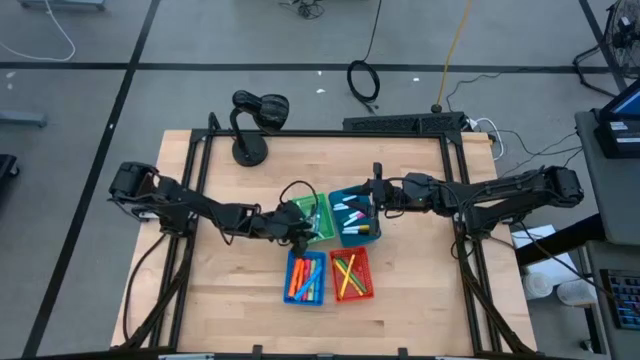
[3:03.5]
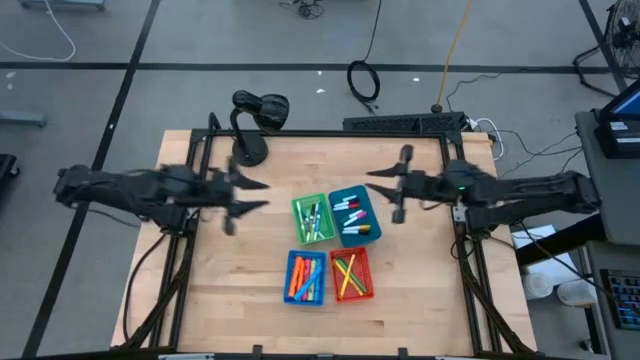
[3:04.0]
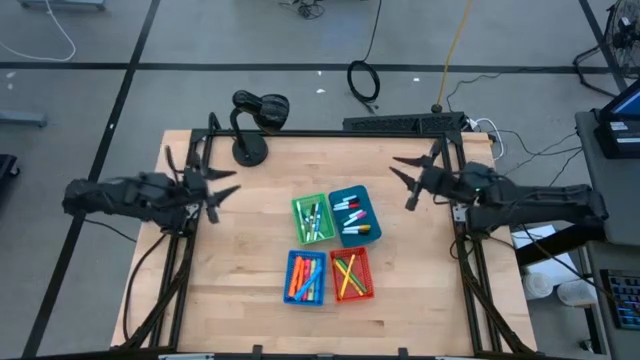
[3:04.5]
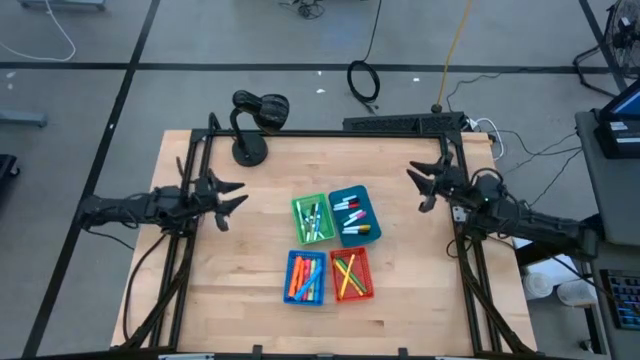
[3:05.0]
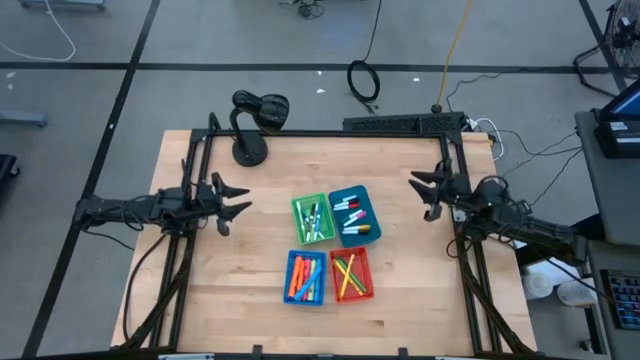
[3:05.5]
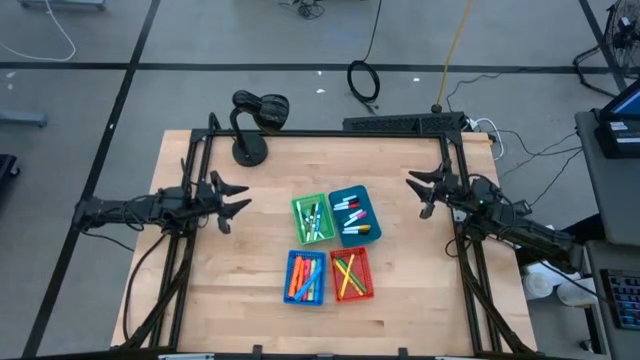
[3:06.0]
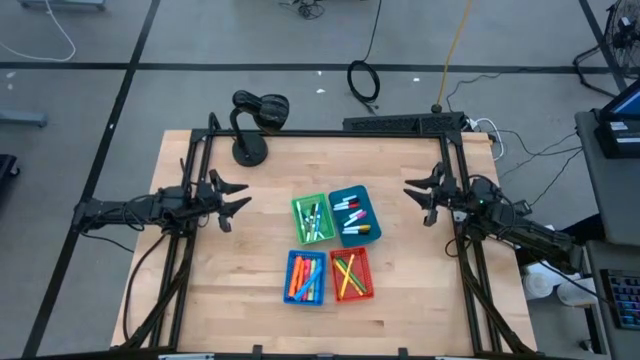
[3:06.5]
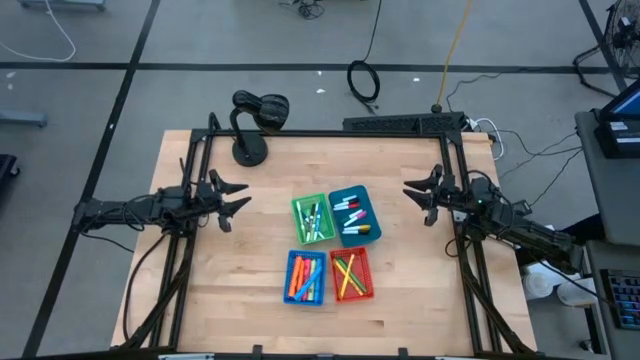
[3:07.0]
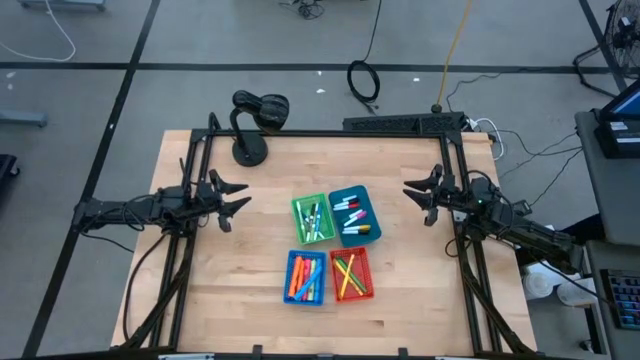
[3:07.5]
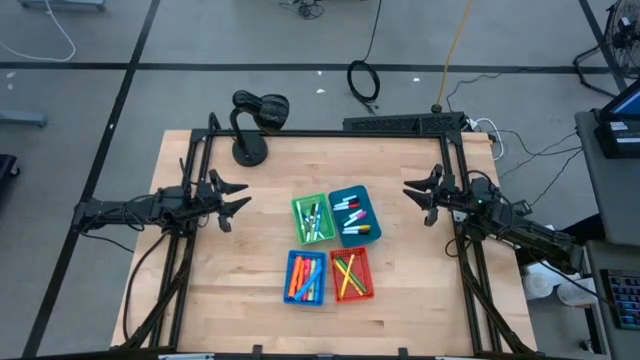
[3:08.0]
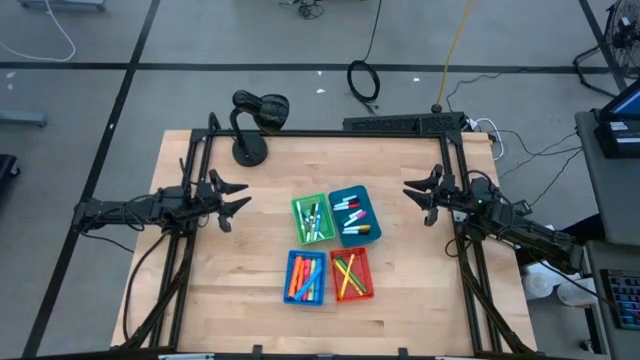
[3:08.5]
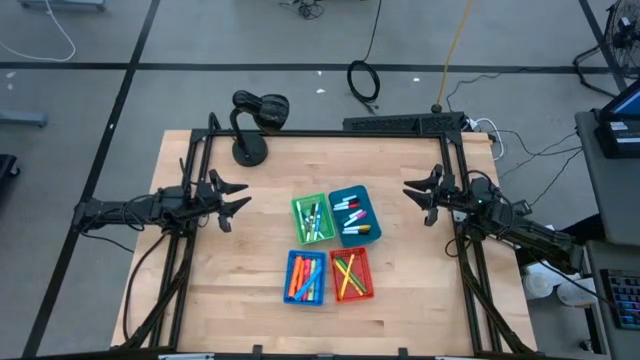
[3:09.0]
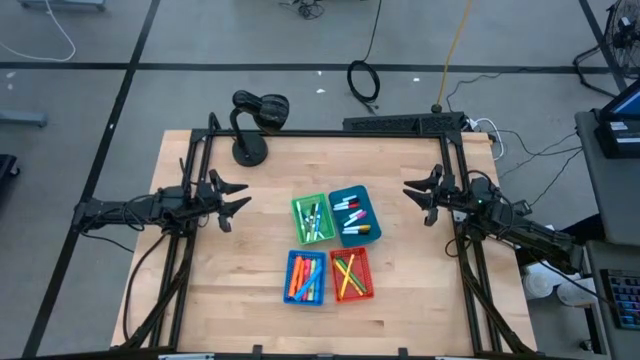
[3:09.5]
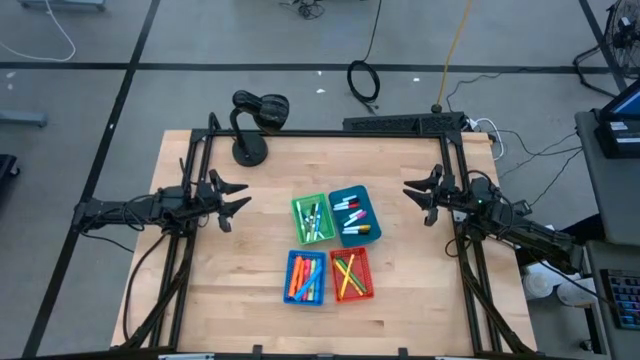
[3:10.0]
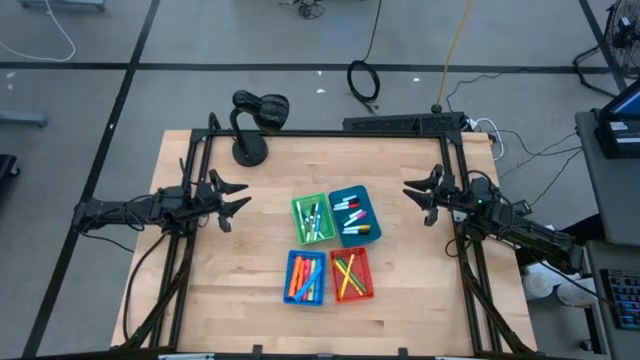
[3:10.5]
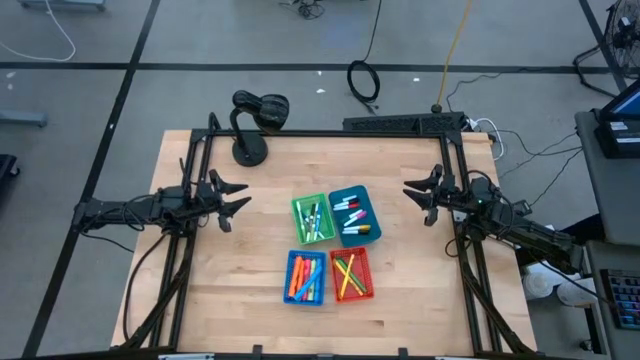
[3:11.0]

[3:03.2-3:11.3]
Task: Pick & Place Markers
Return to Home Position

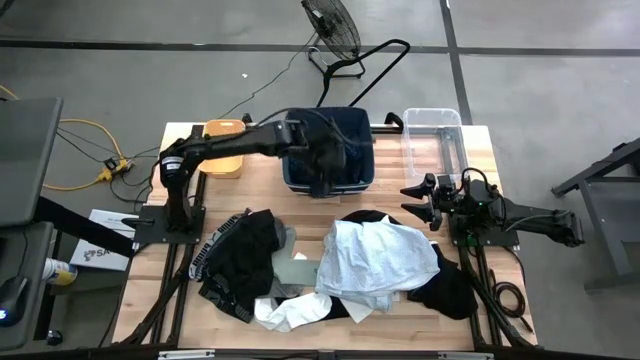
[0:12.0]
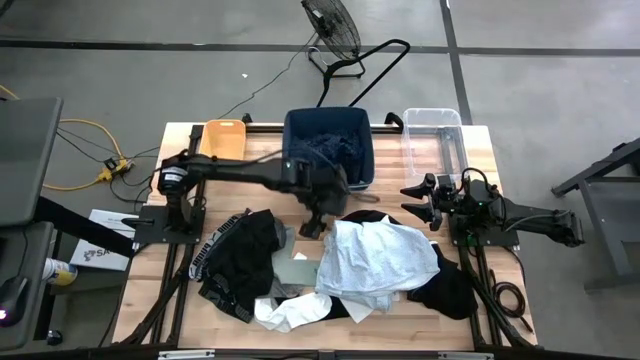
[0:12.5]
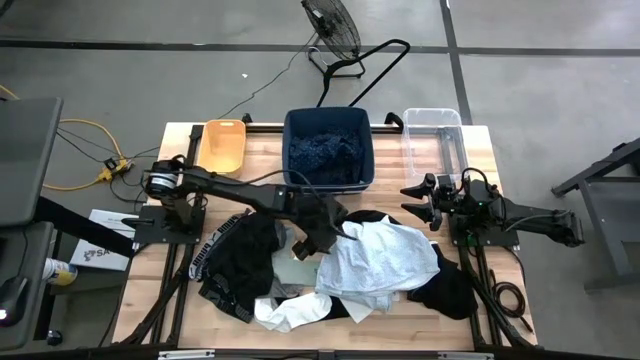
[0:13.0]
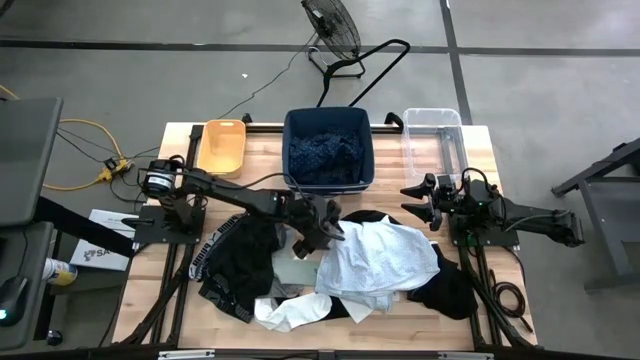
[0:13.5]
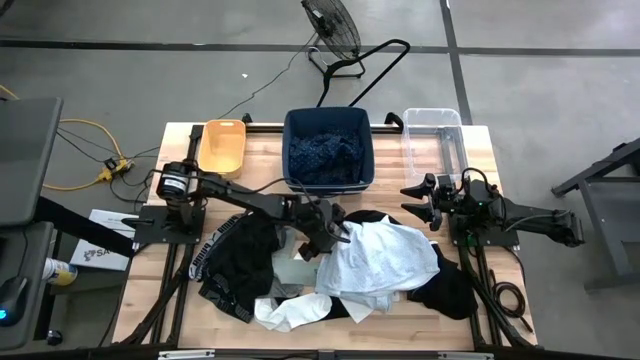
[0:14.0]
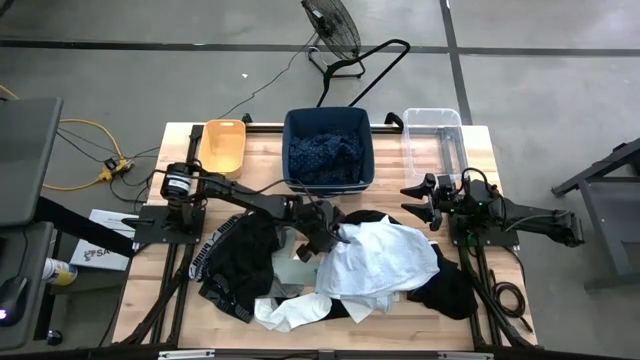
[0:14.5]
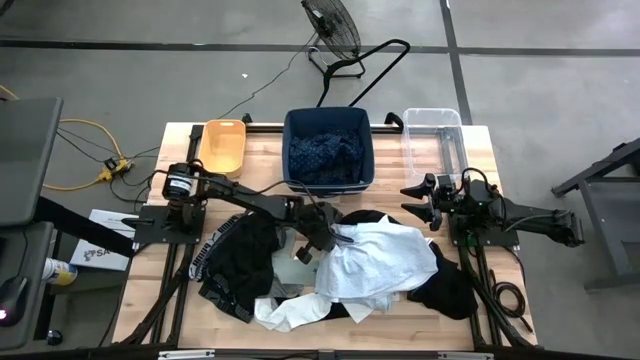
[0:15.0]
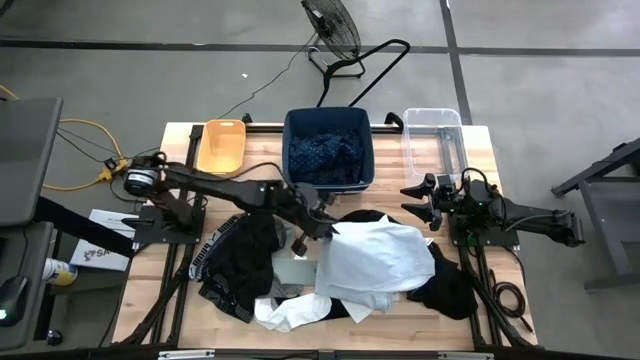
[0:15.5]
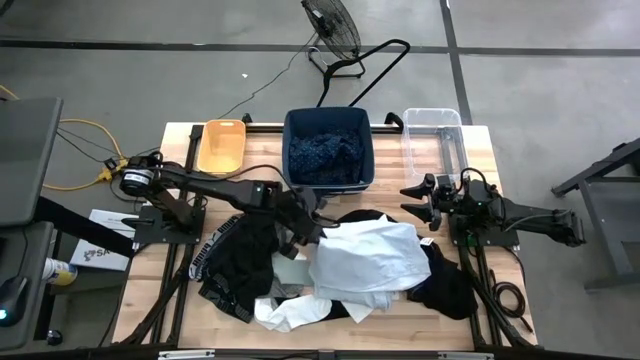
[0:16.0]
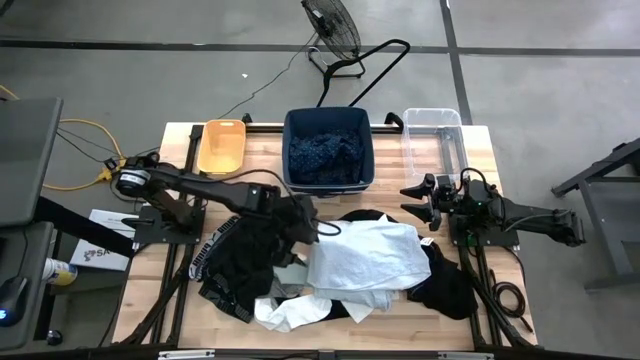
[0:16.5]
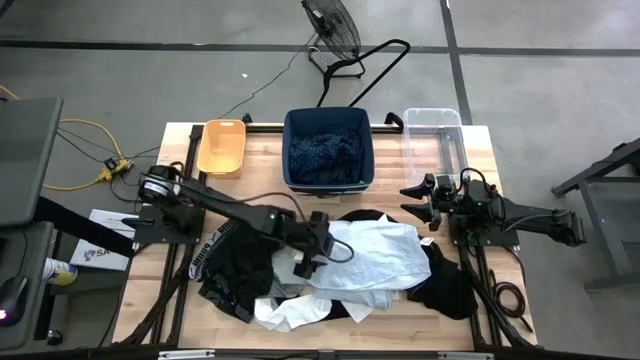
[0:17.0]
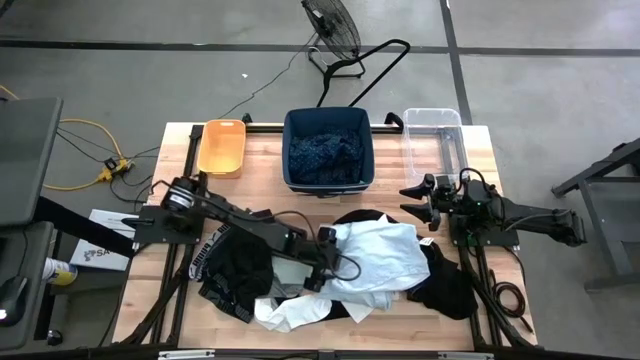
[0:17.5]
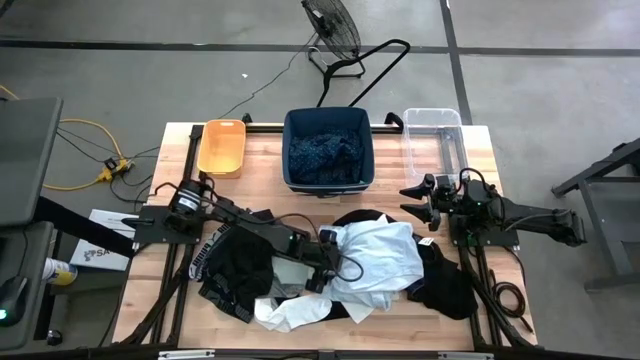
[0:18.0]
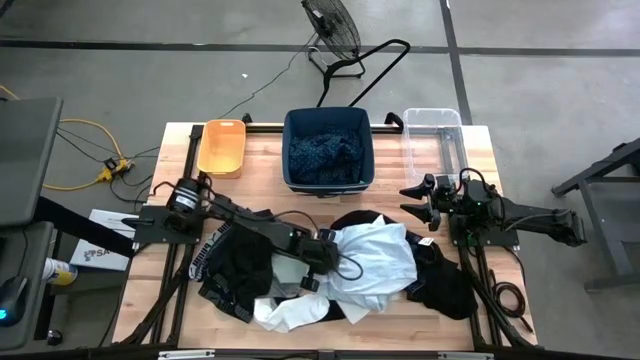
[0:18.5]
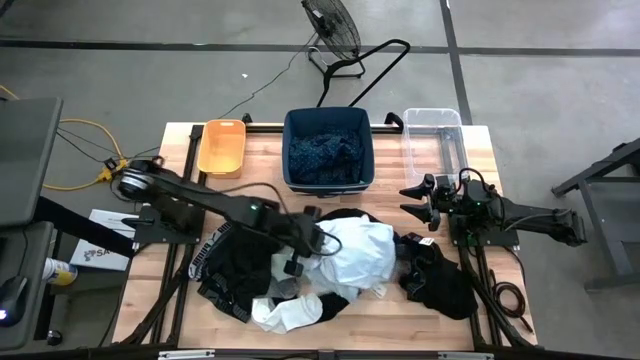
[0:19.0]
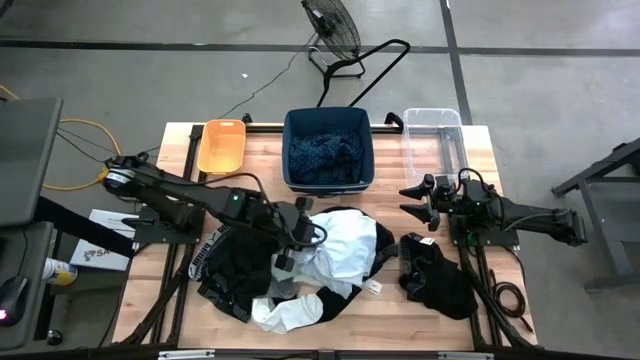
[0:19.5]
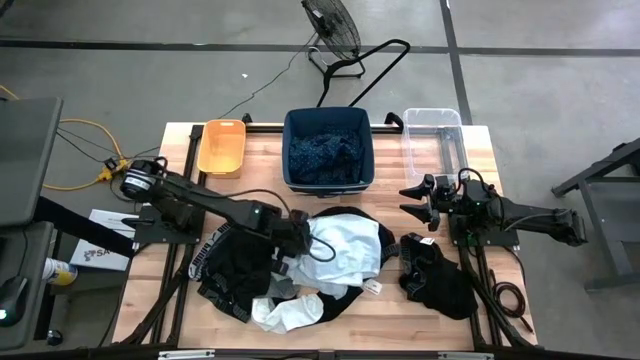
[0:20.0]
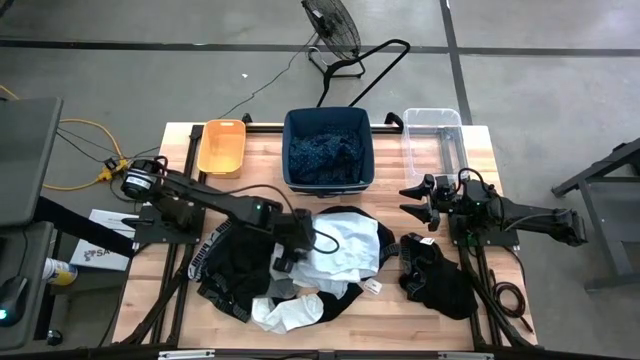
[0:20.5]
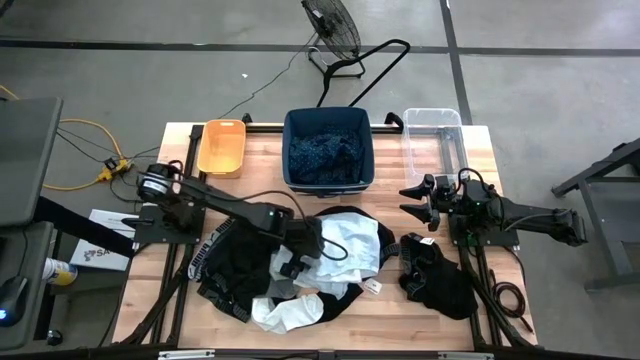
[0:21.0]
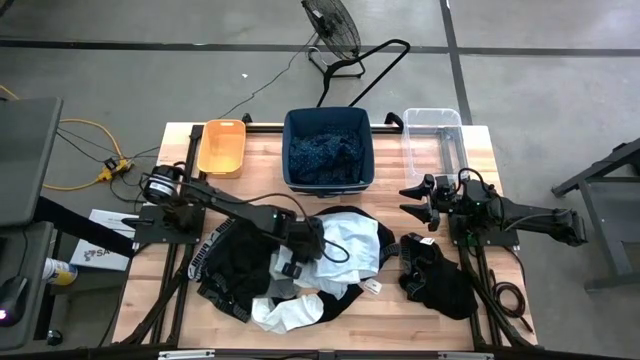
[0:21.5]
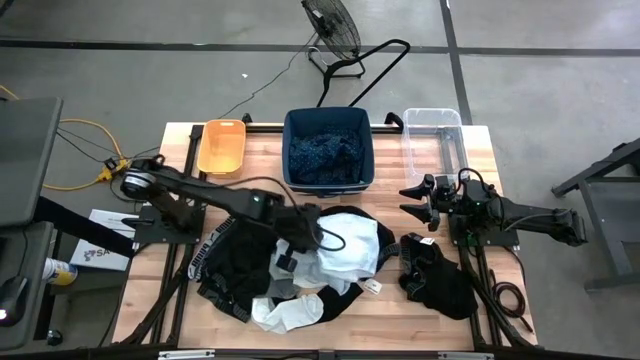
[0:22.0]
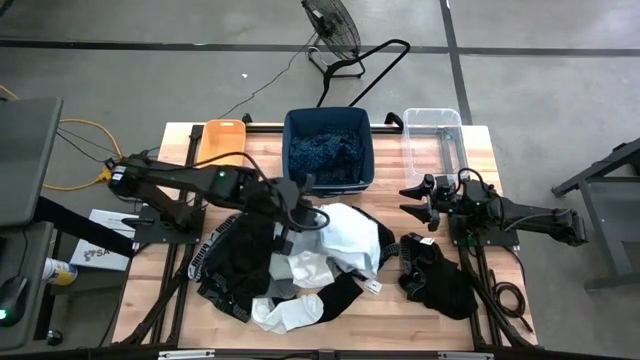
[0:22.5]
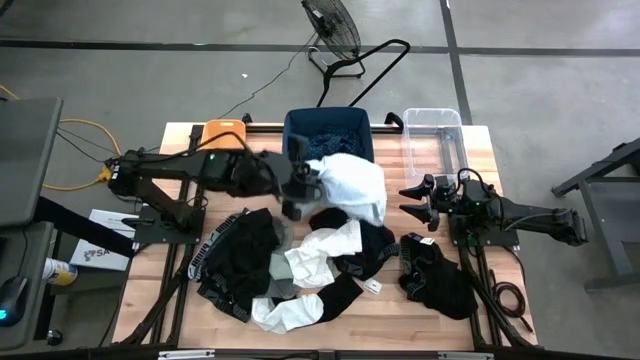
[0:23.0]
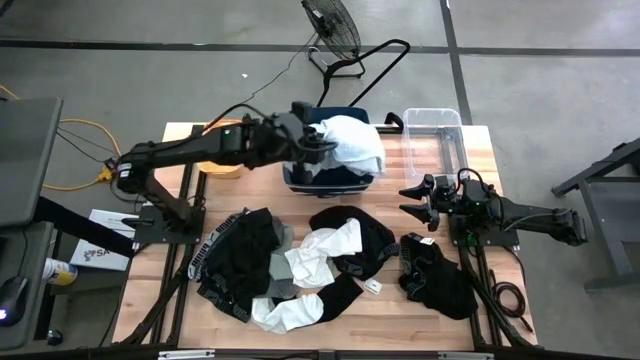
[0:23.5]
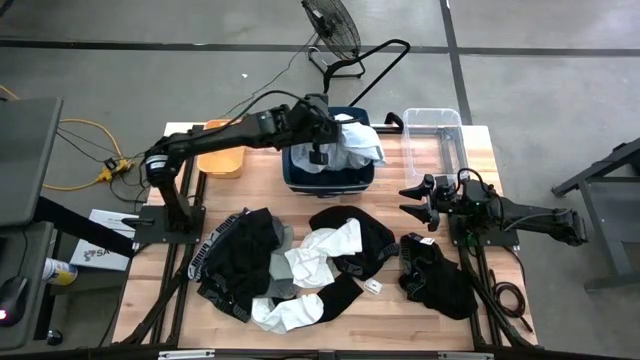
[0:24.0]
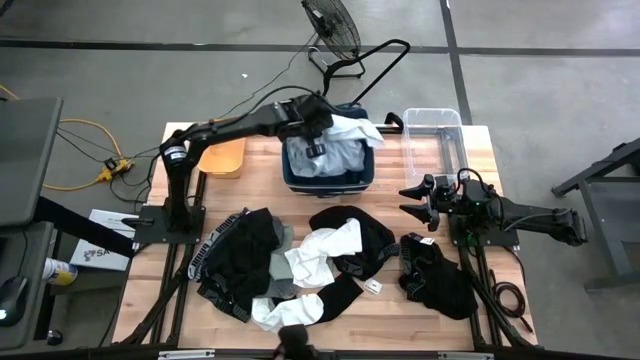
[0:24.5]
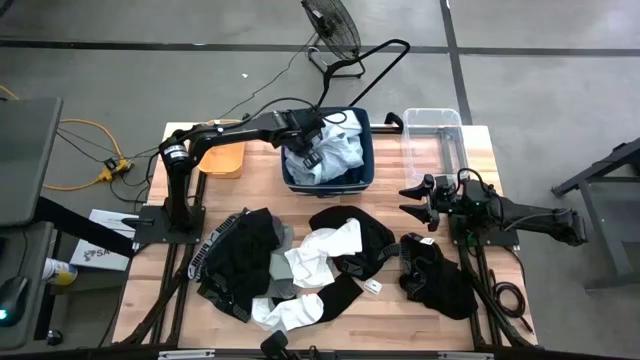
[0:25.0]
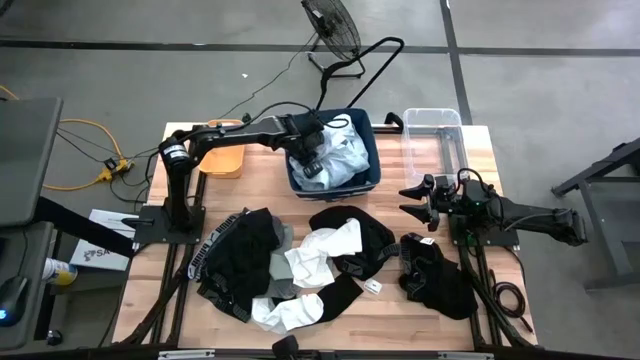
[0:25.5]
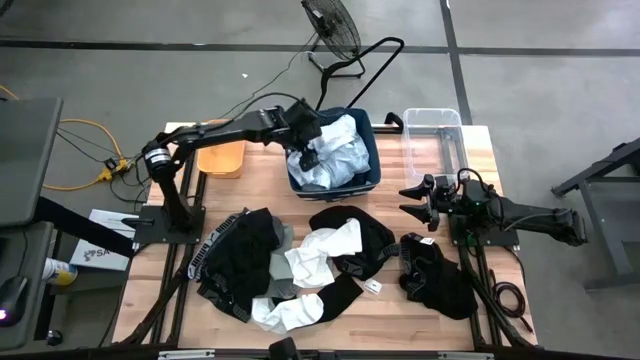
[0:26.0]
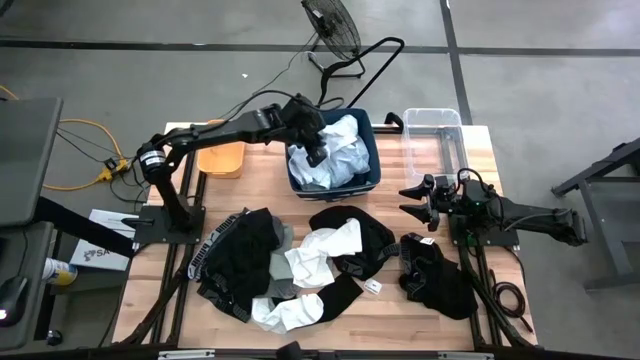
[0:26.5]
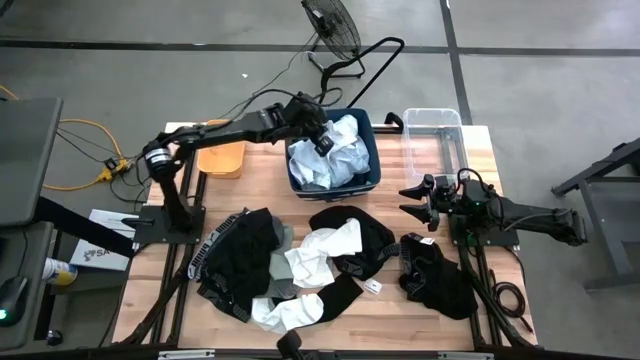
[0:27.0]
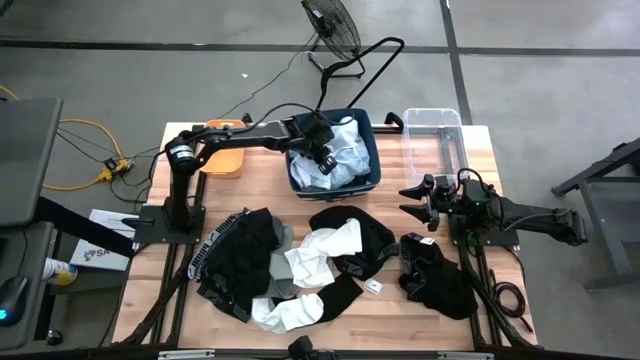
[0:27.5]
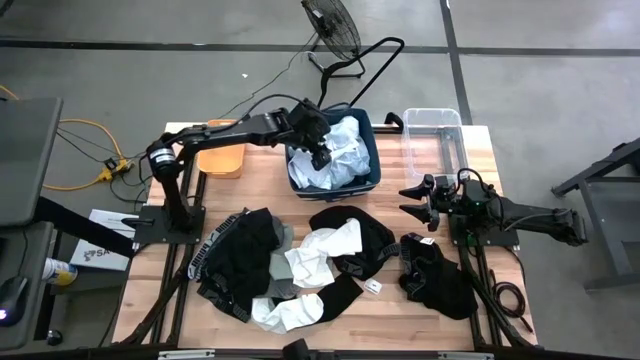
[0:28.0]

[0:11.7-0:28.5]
Task: Pick & Place Cloths
Put the gray t-shirt into the blue bin
